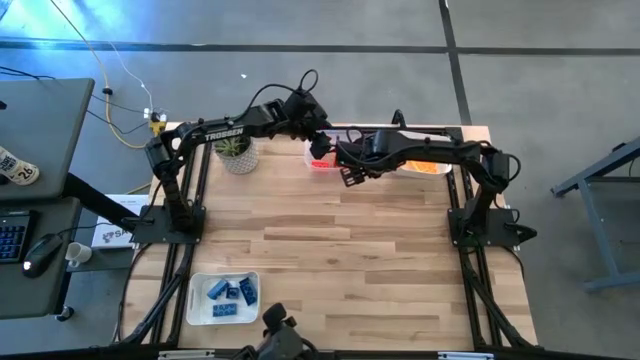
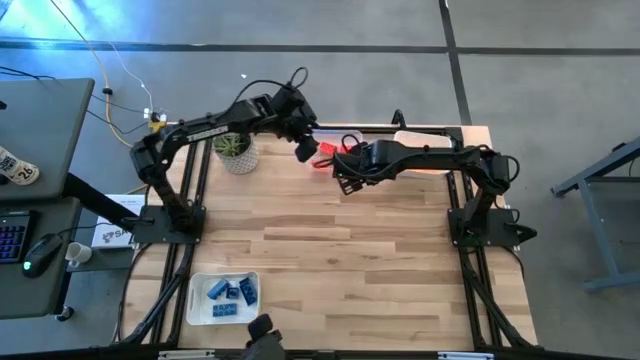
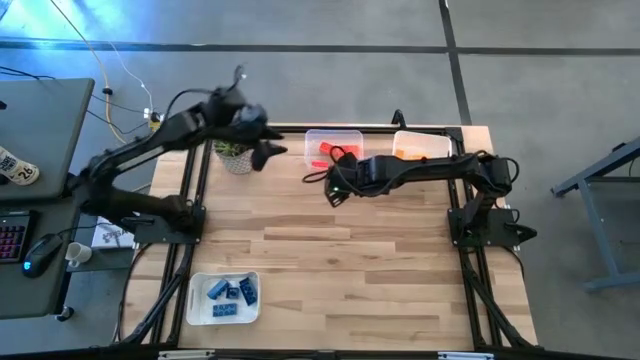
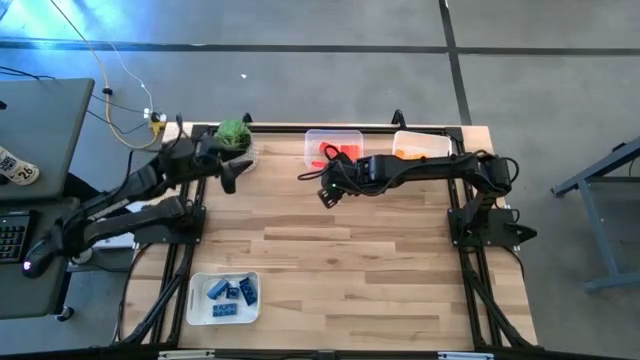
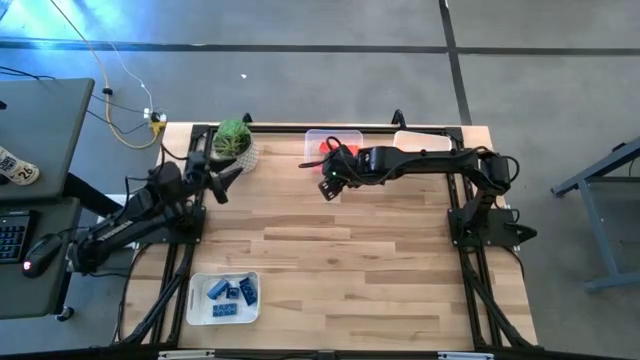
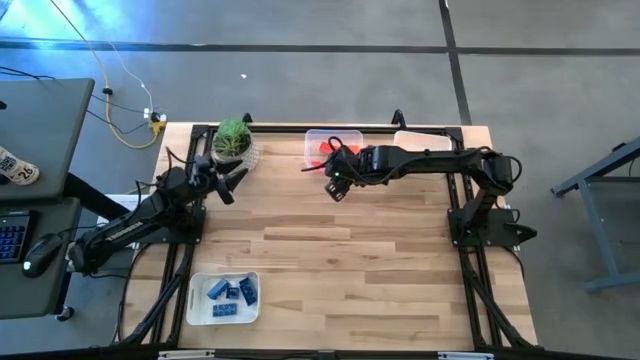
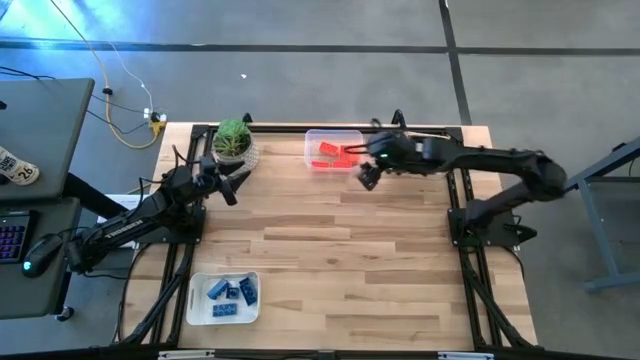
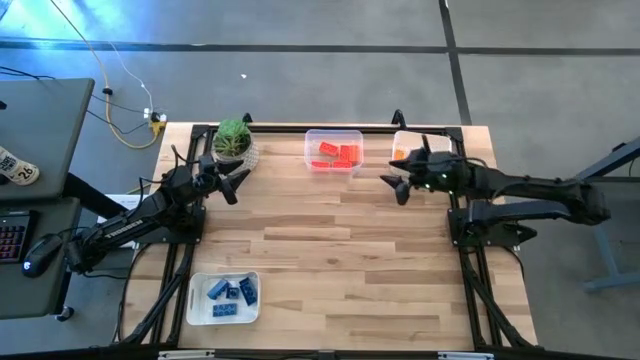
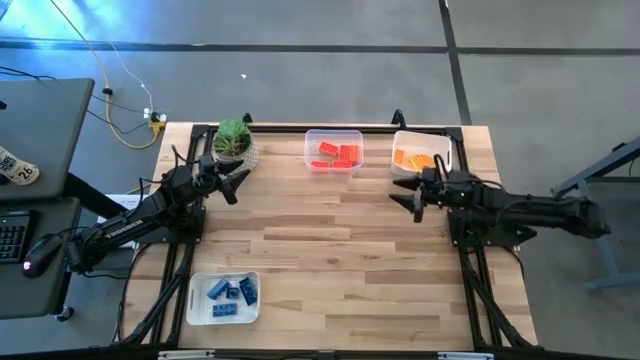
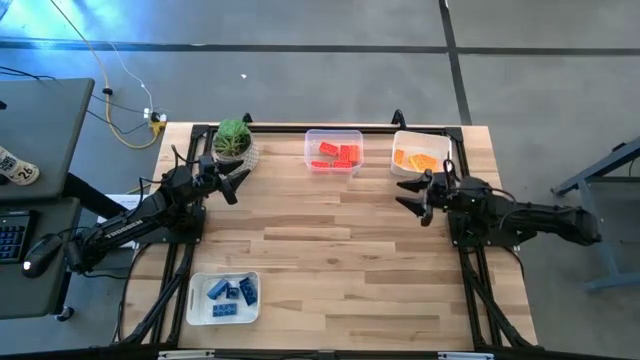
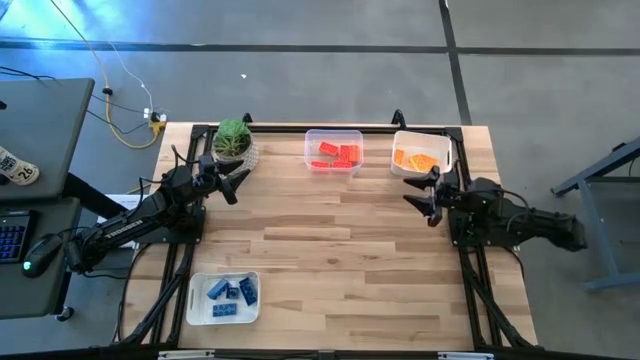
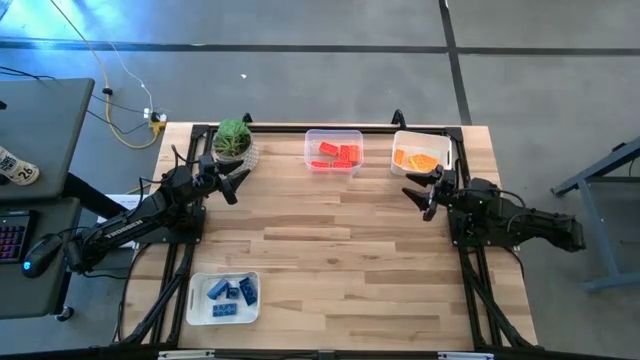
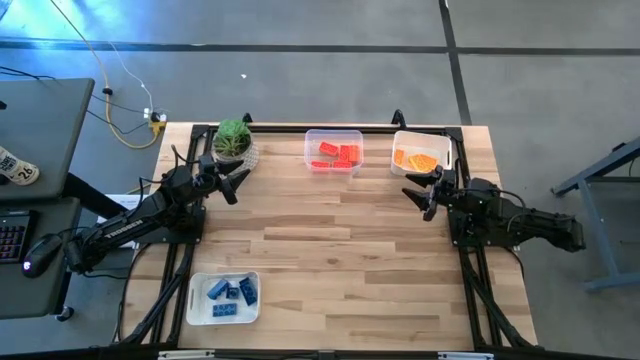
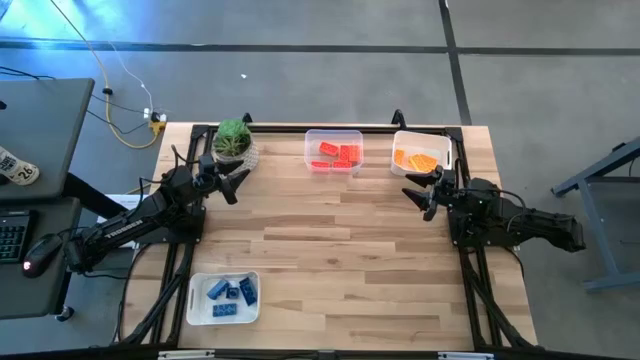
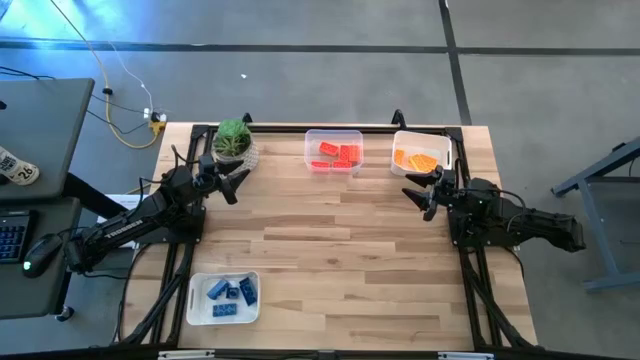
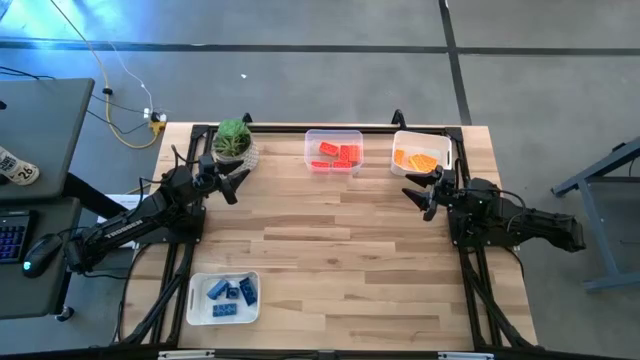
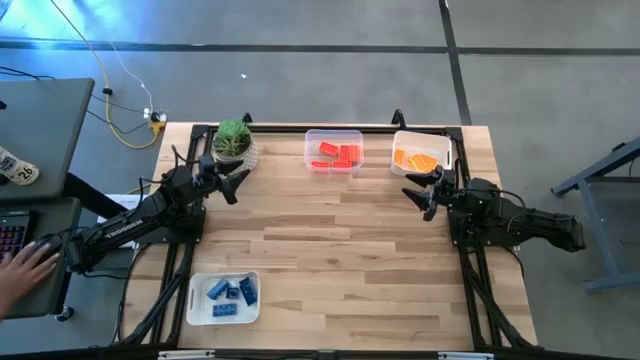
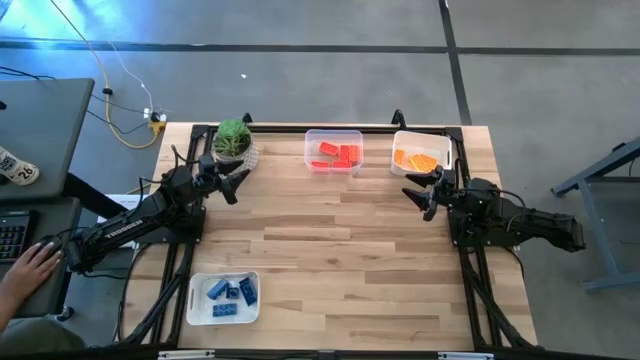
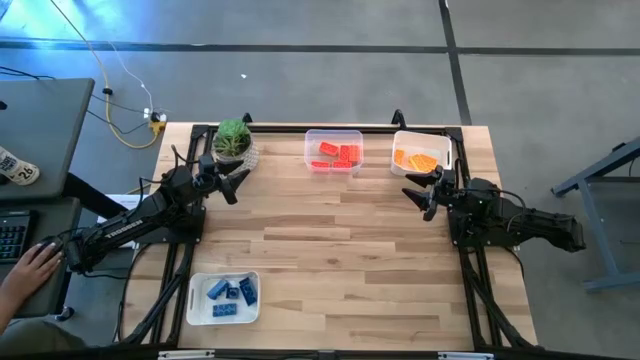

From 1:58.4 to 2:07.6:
Task: Sort & place blocks by color
Return to Home Position

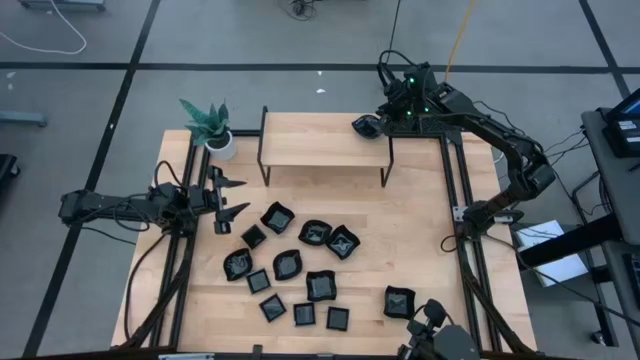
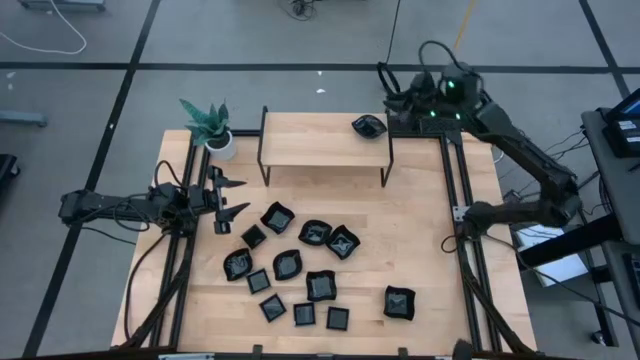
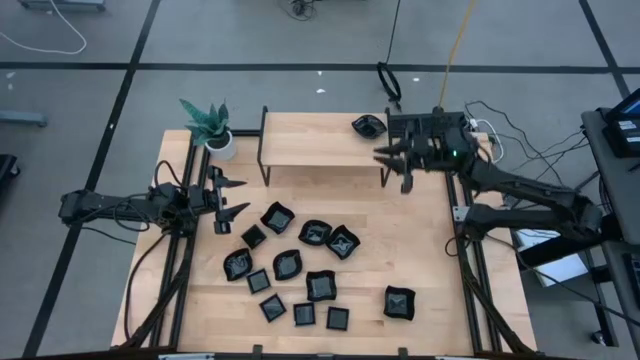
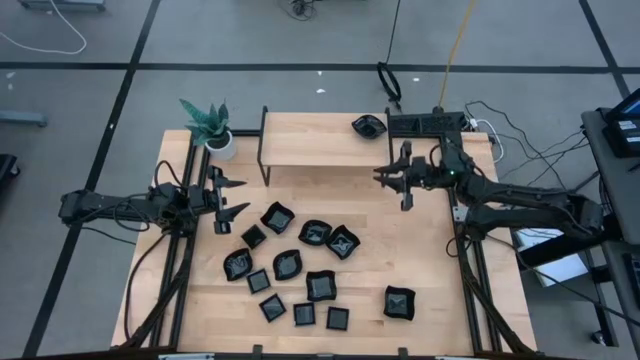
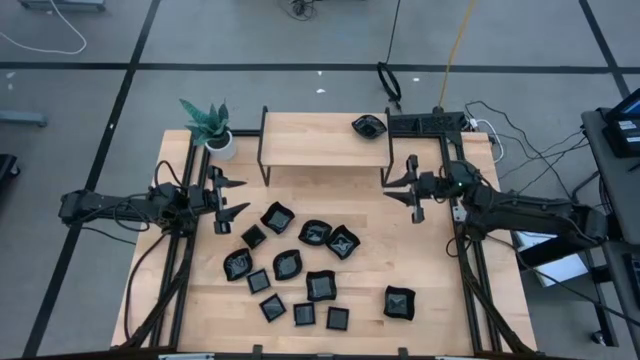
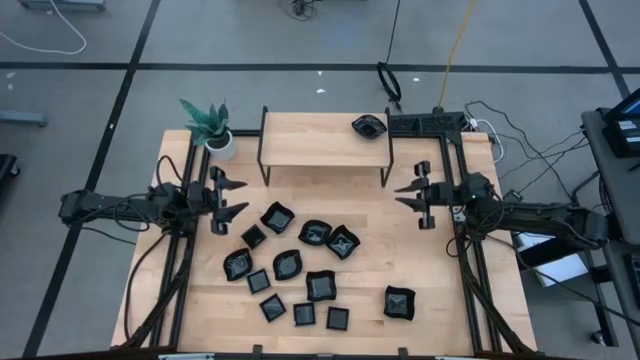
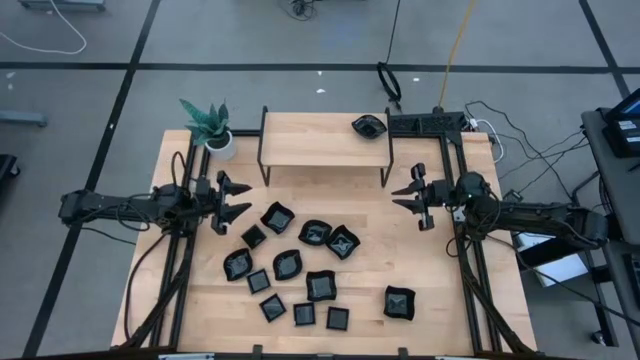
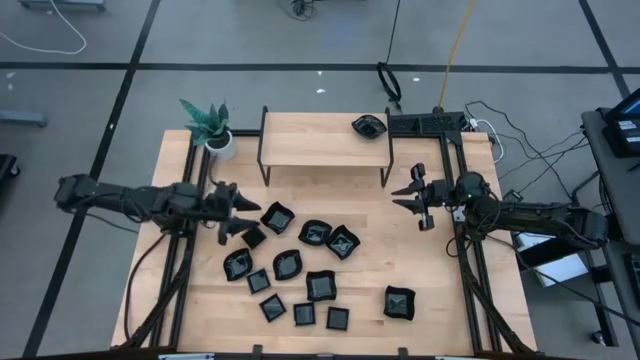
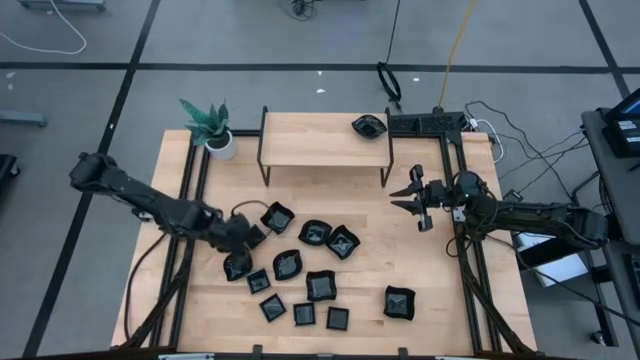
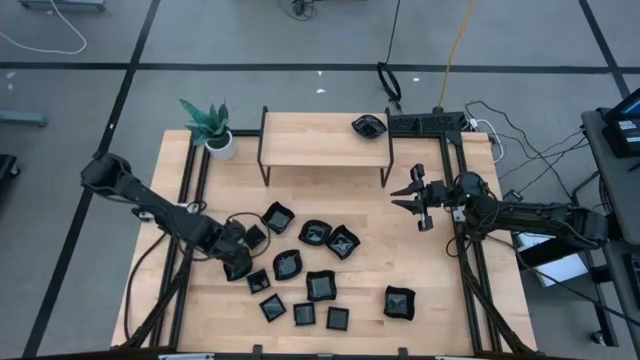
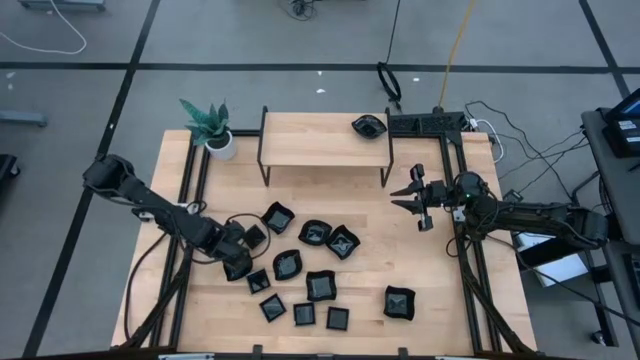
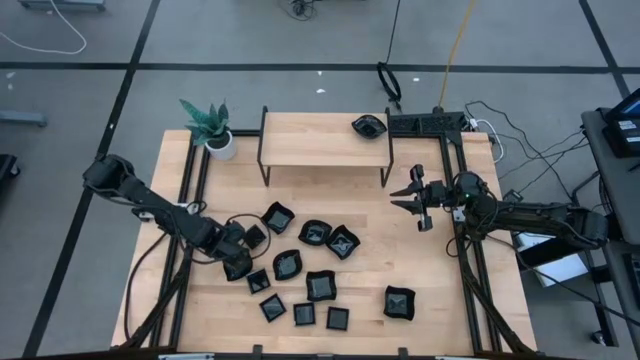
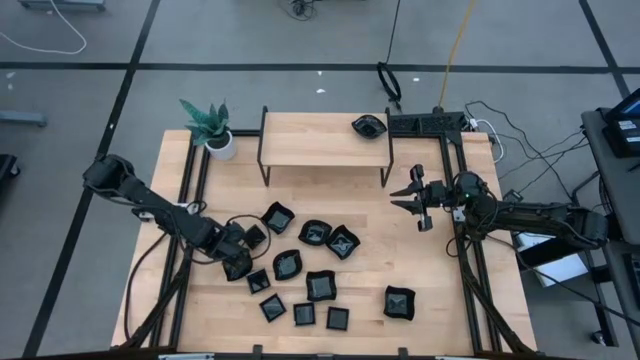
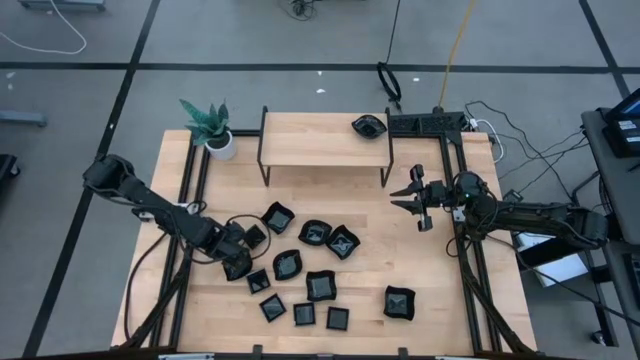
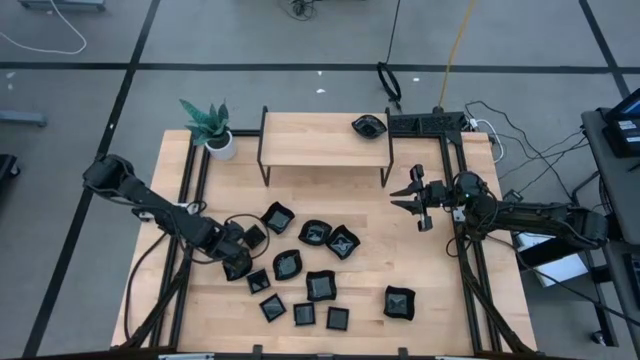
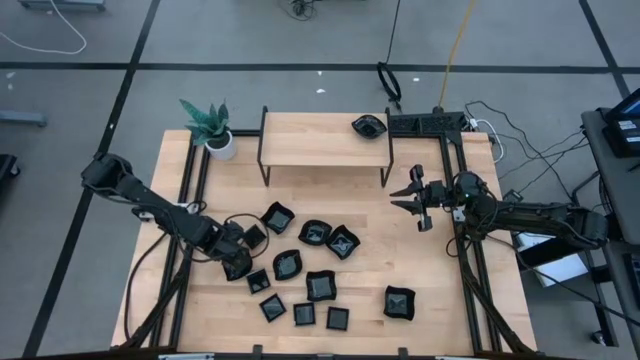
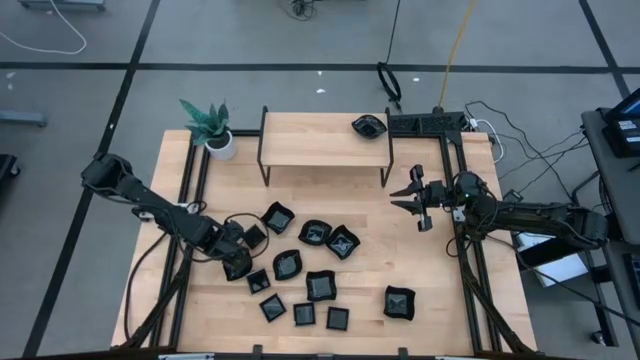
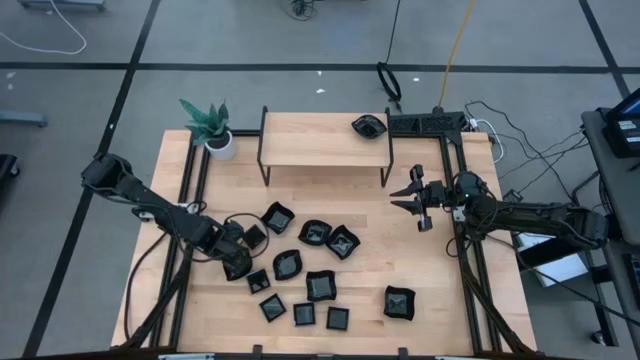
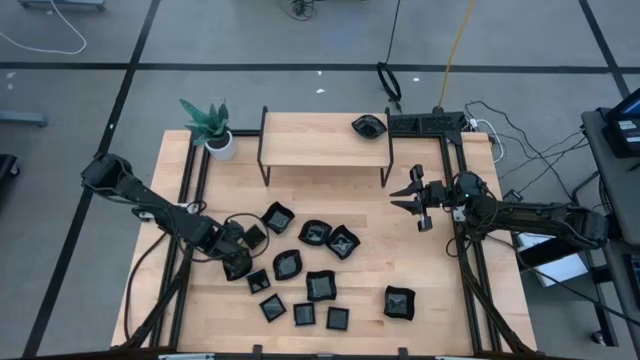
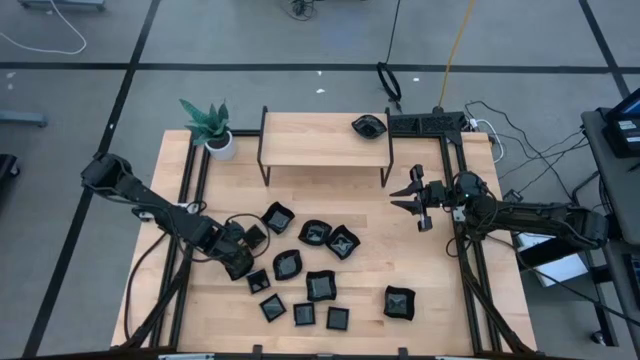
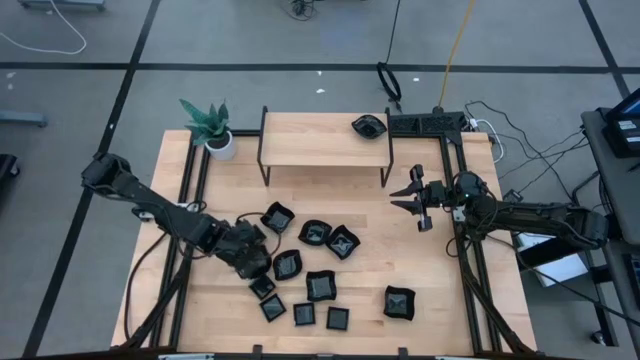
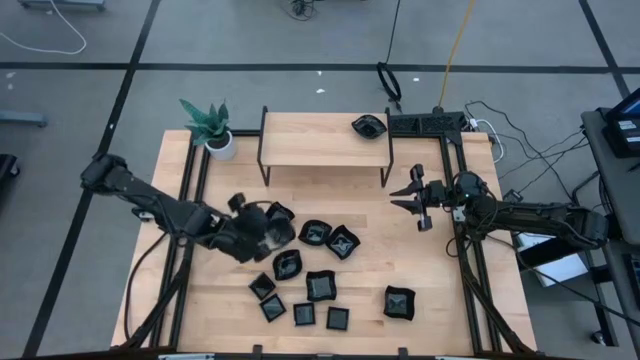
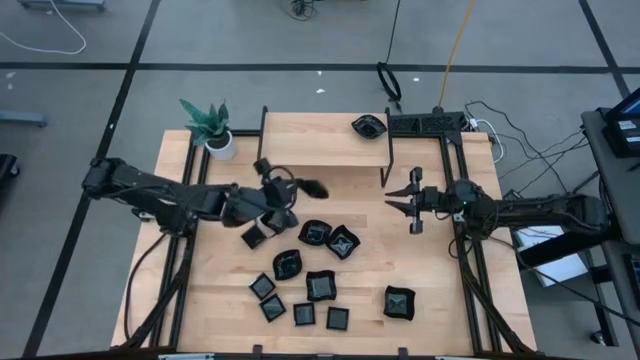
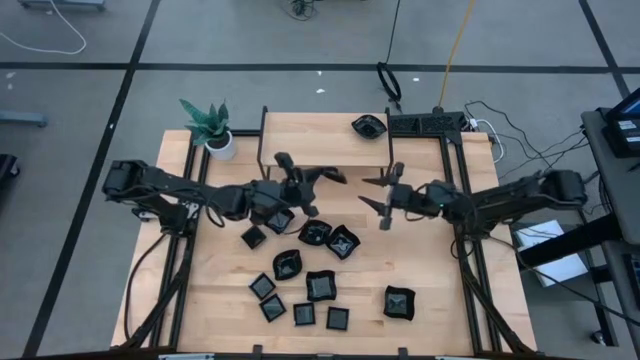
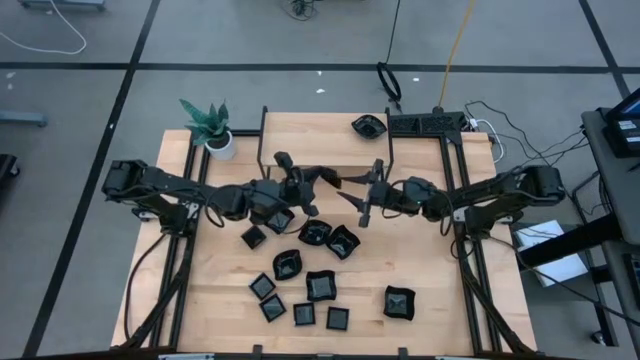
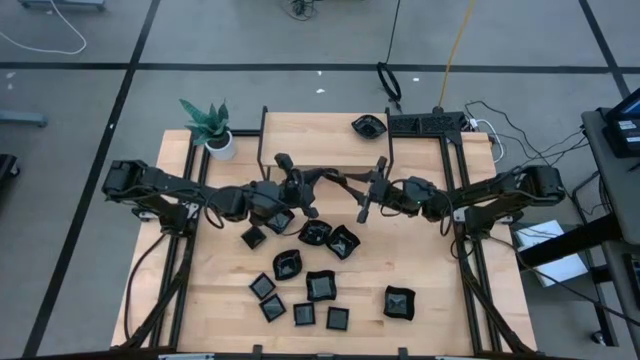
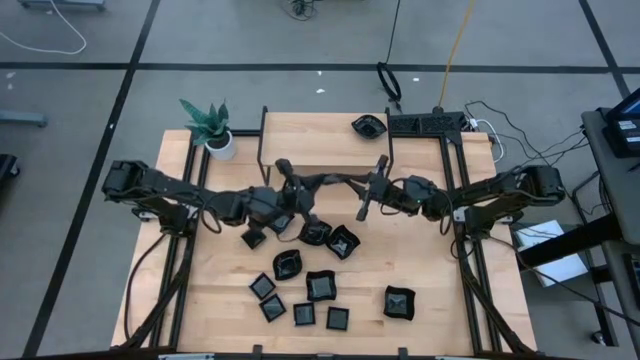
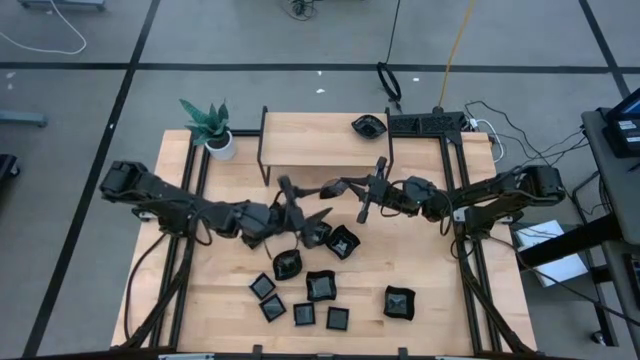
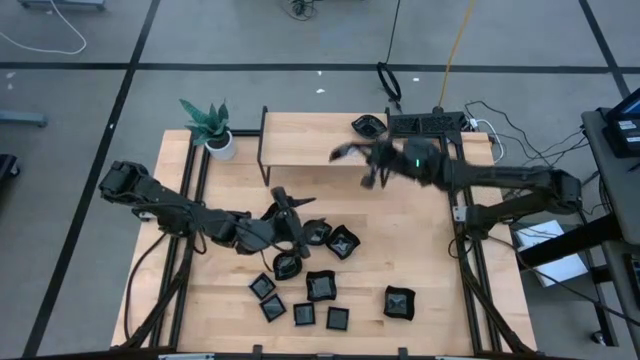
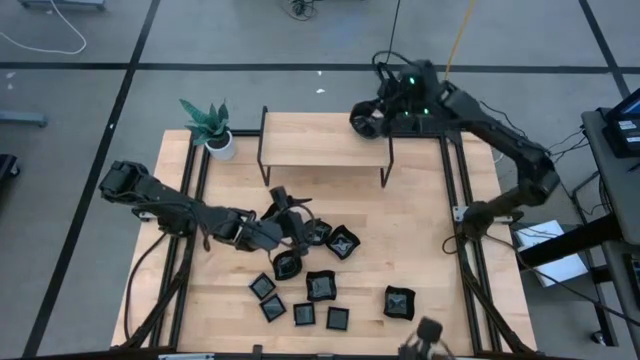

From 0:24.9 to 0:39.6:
Task: Pick & Place Mini shaped plates
Stack the black leaf-shaped plate on top of the other black leaf-shaped plates on the shelf
